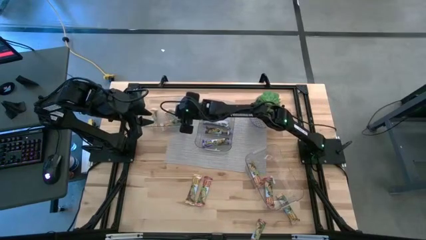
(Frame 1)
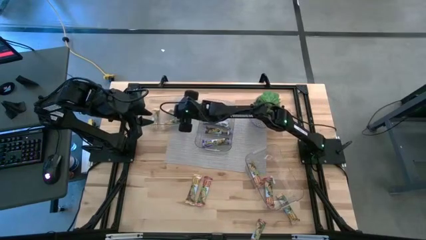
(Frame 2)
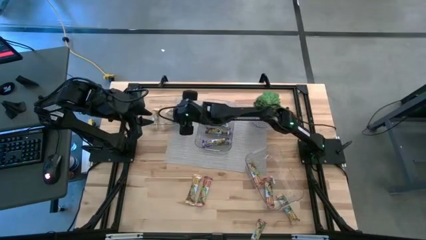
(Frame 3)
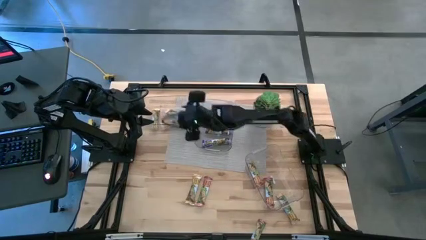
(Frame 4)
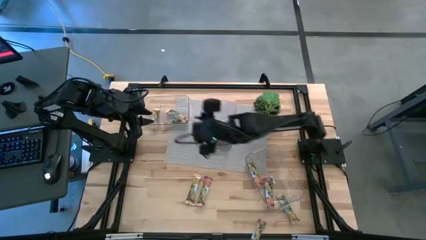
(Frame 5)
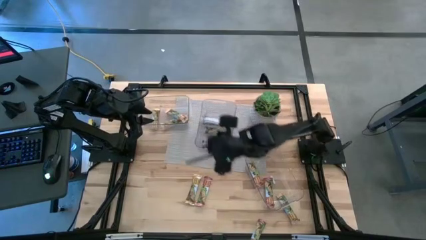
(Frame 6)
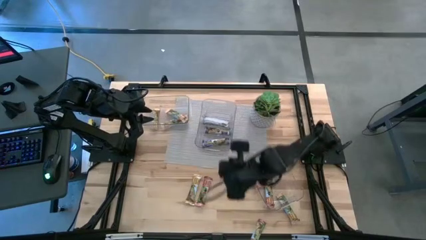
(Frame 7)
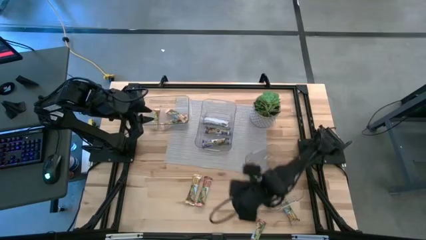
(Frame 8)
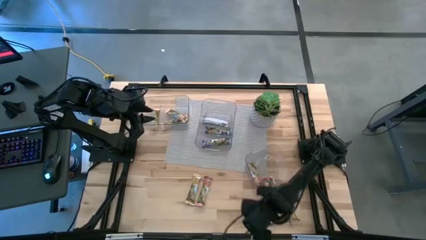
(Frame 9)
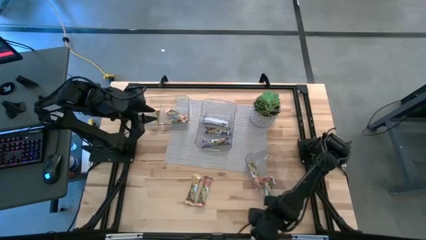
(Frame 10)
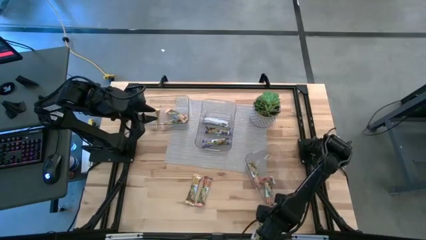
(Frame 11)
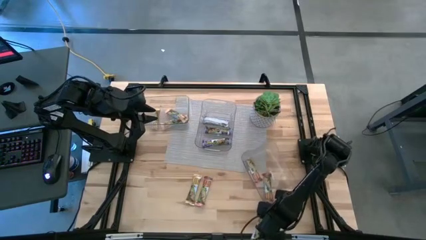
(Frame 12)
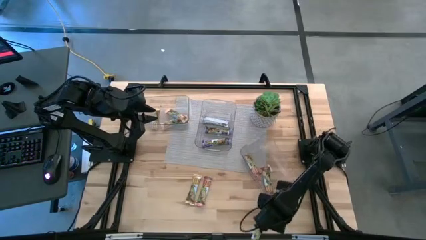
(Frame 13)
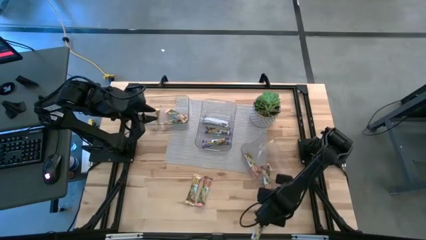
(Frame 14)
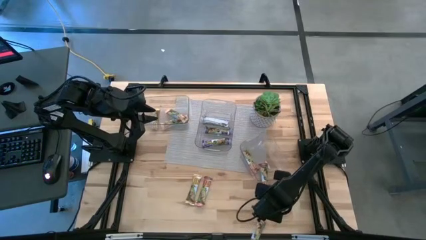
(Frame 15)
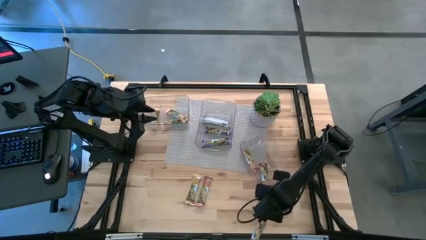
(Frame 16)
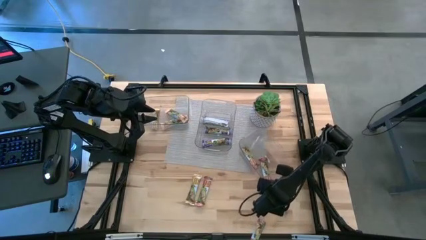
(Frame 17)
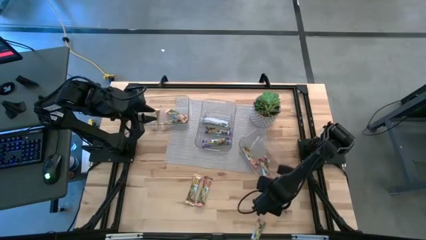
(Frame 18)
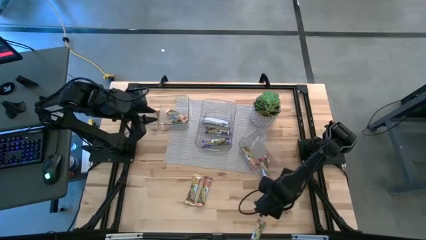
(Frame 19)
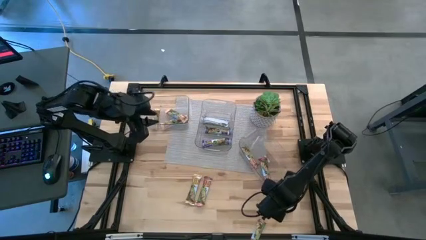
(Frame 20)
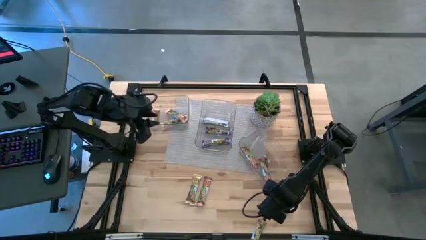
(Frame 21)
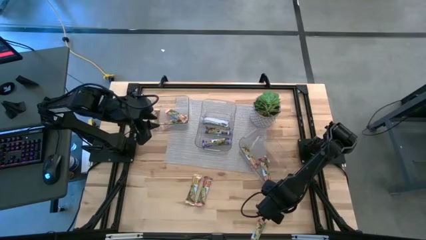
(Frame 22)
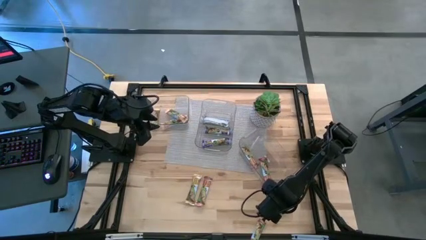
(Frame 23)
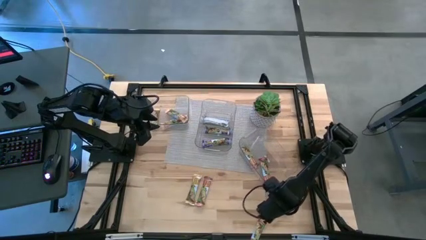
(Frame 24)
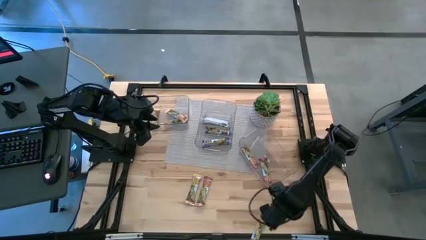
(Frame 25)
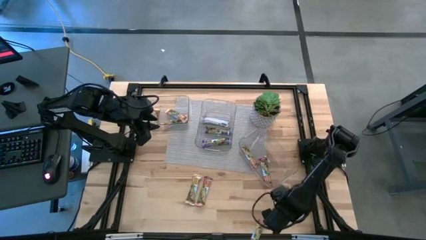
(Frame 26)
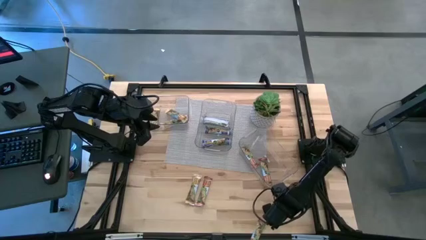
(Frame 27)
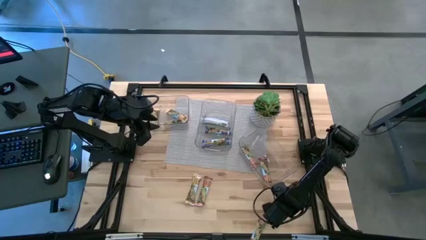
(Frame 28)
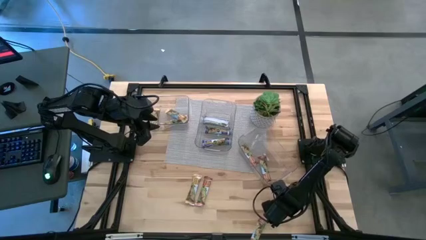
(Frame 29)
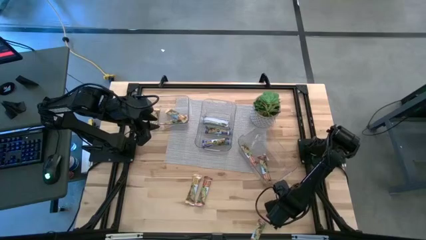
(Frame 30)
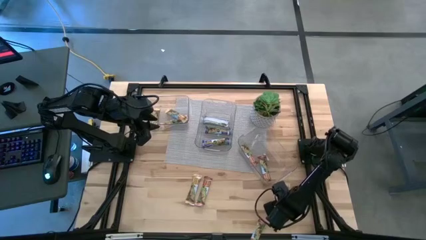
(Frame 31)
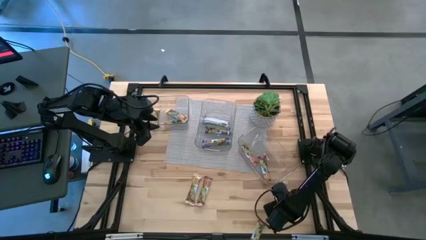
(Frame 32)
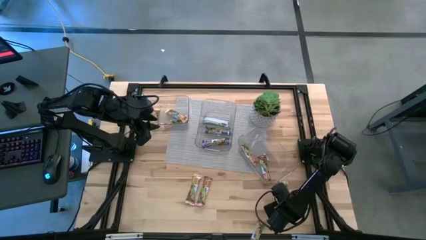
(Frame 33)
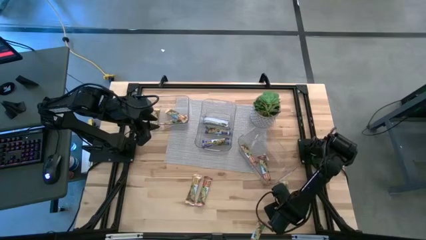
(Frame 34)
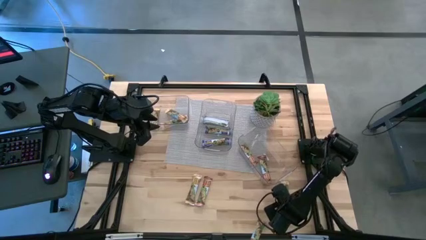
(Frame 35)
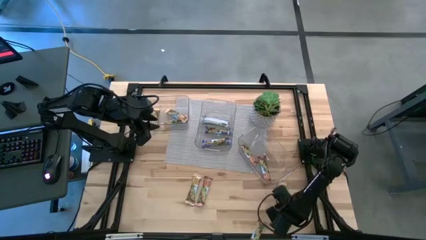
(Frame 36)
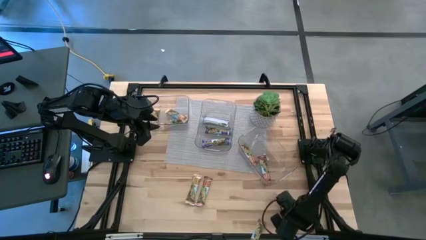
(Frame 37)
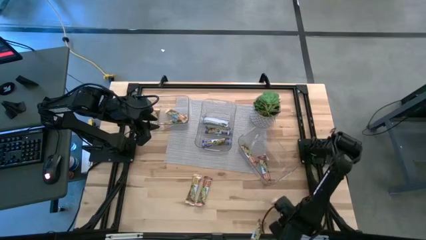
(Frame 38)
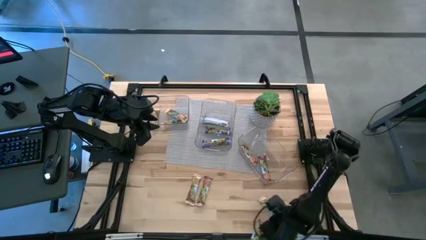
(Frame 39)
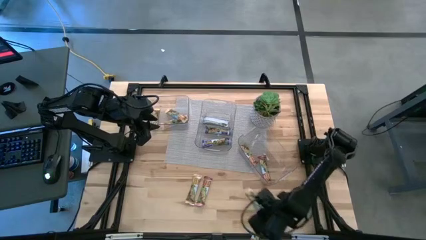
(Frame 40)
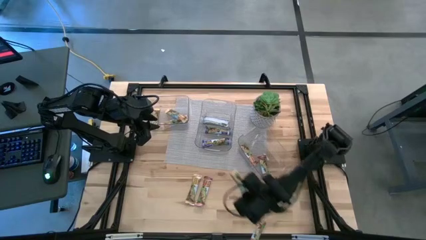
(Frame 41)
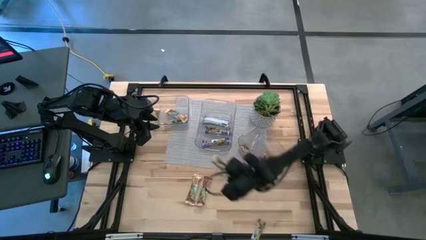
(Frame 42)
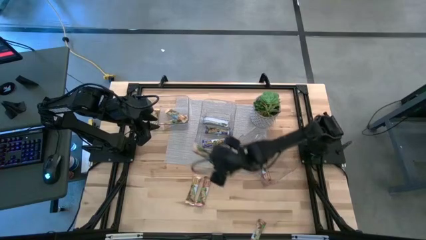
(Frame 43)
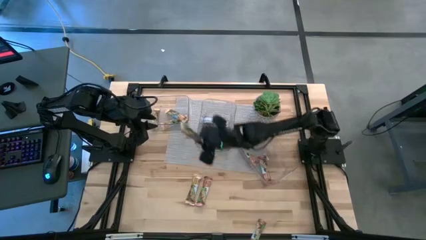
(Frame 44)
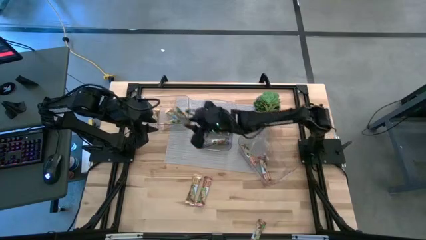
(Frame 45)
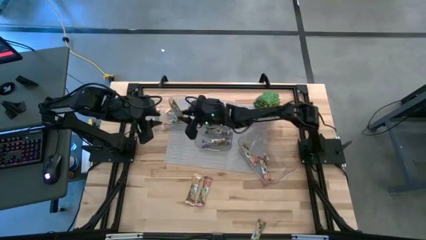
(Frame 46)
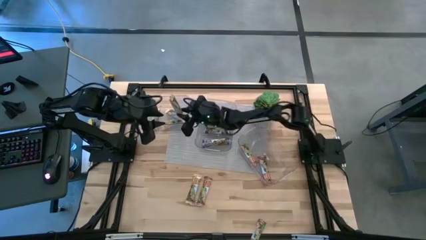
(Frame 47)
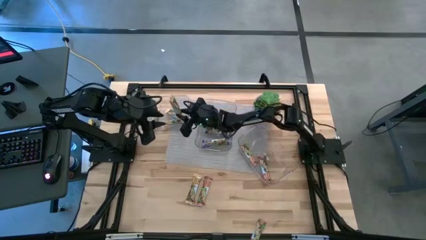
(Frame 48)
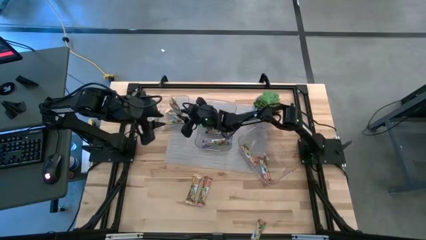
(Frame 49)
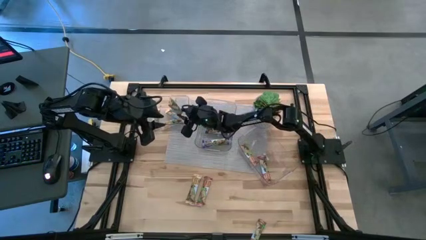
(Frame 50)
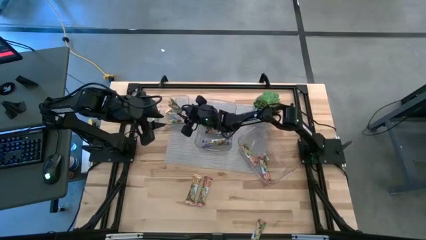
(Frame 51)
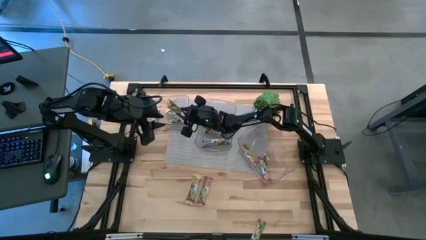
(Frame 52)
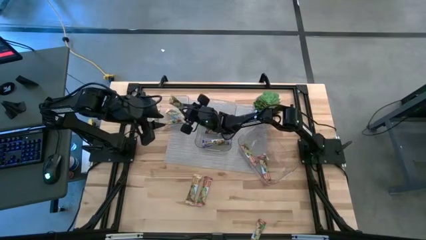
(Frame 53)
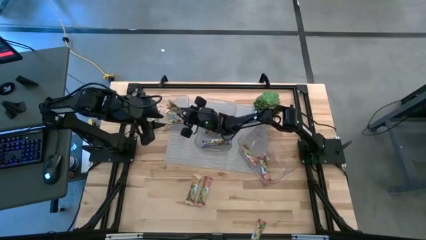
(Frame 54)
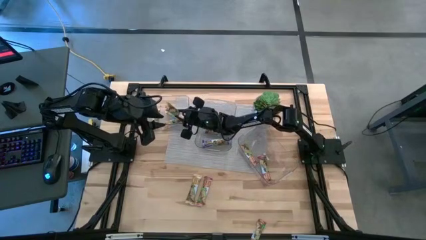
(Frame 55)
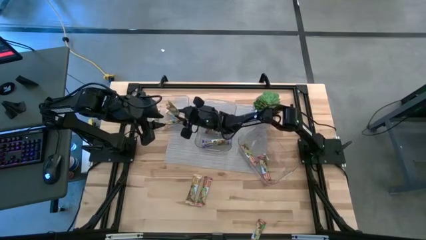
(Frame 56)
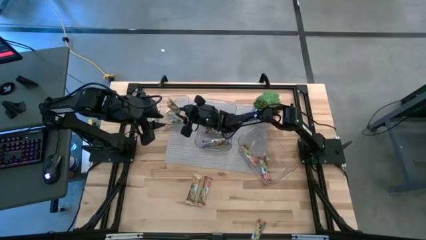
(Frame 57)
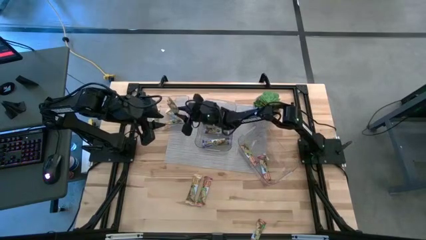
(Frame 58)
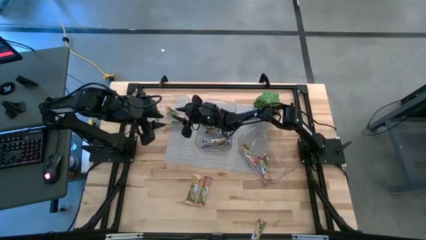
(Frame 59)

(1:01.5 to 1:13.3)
Task: Pick and place Granola Bars by type
Put the yellow granola bar into the left transparent bin

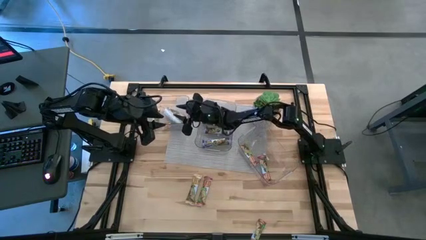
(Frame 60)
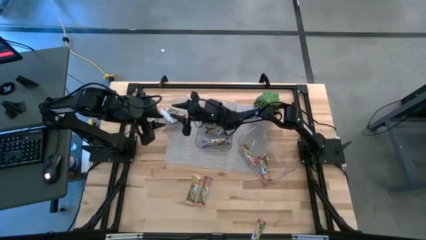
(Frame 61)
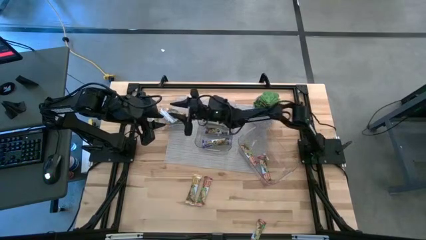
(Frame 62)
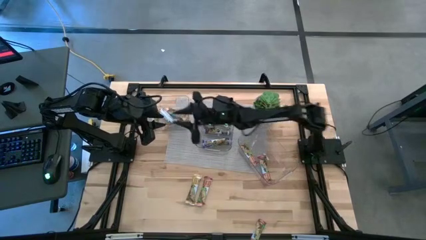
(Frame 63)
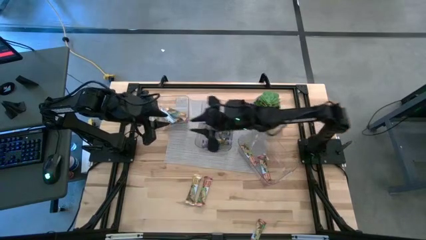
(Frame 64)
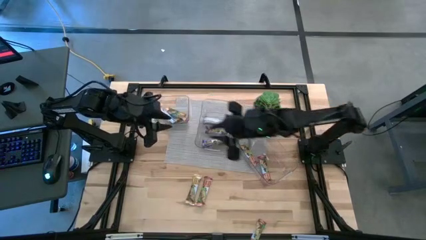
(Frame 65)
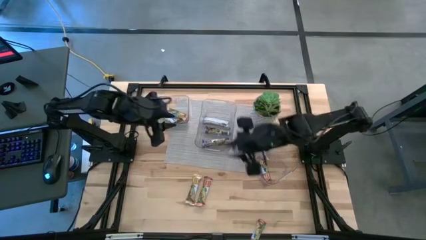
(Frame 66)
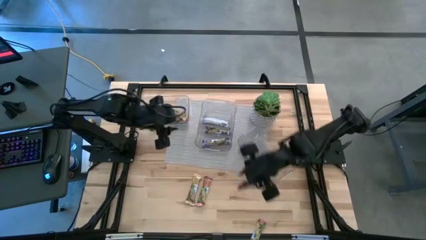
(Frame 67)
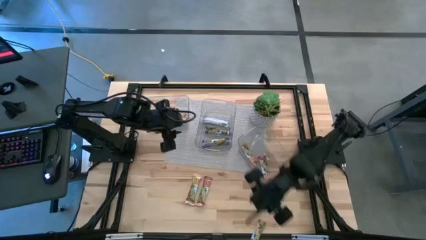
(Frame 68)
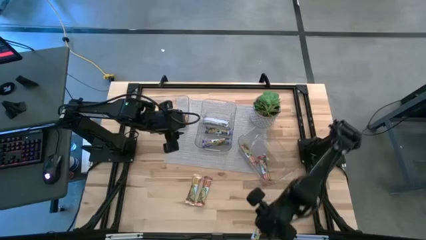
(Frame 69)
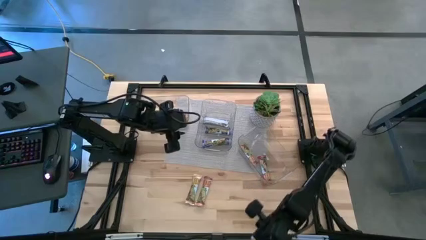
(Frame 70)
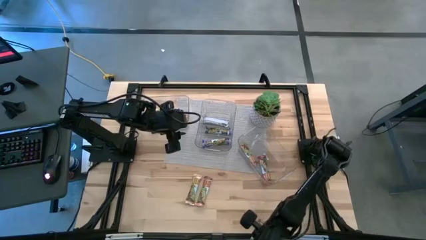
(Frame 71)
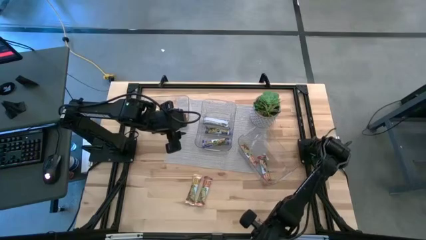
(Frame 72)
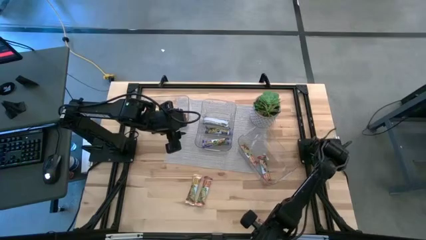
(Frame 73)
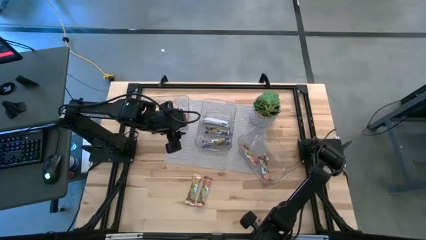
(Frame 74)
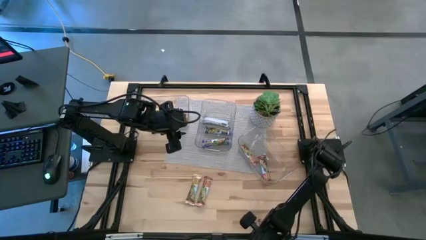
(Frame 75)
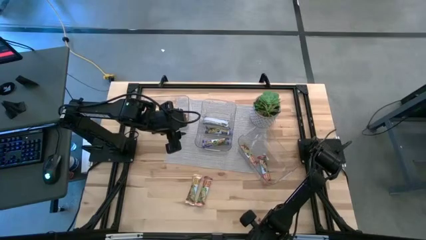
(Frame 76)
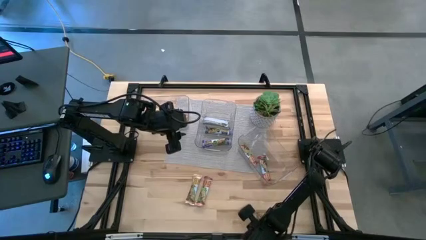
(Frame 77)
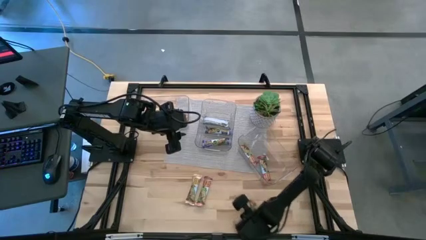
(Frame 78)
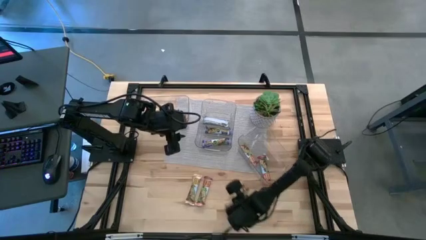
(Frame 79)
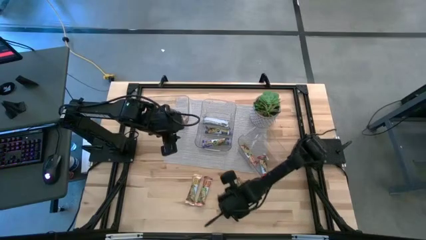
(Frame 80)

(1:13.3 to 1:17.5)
Move the red granola bar to the bottom center of the table
